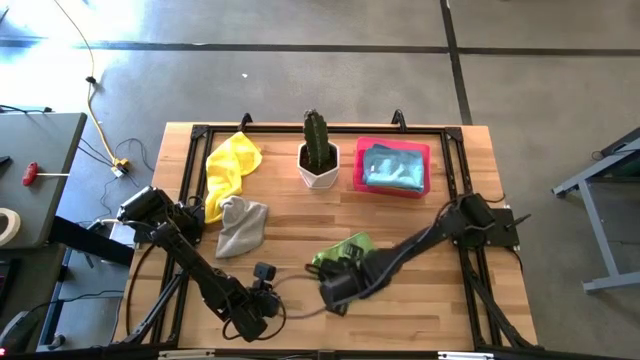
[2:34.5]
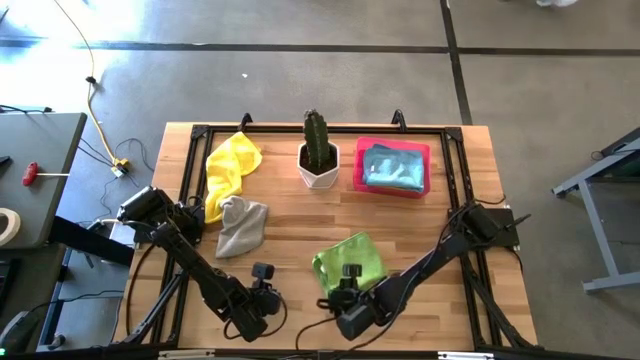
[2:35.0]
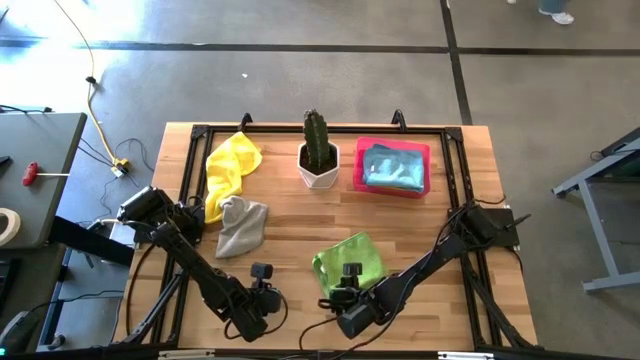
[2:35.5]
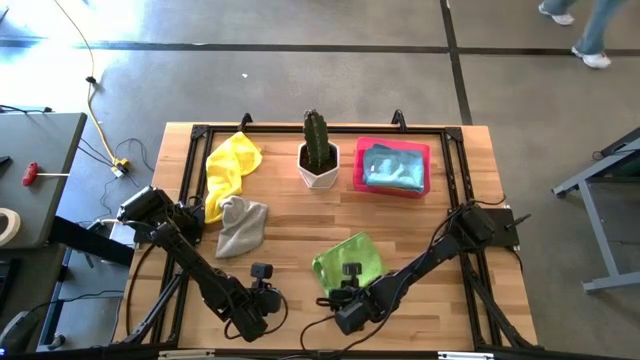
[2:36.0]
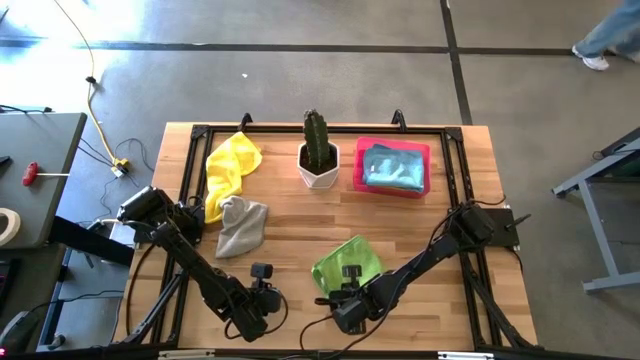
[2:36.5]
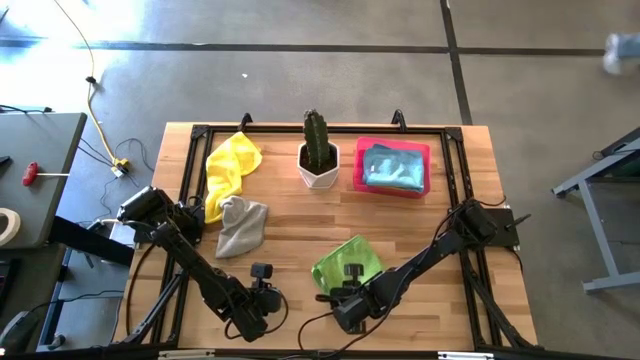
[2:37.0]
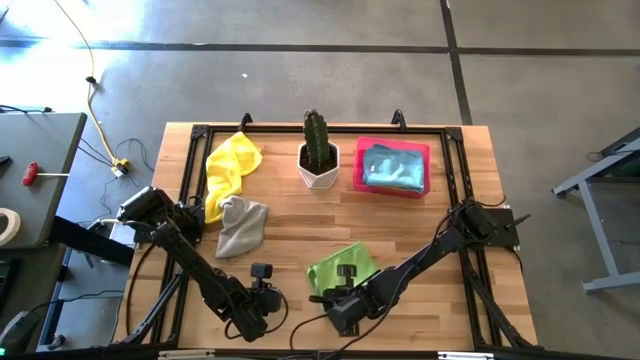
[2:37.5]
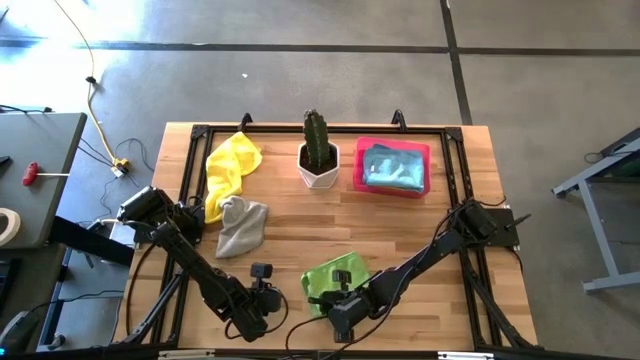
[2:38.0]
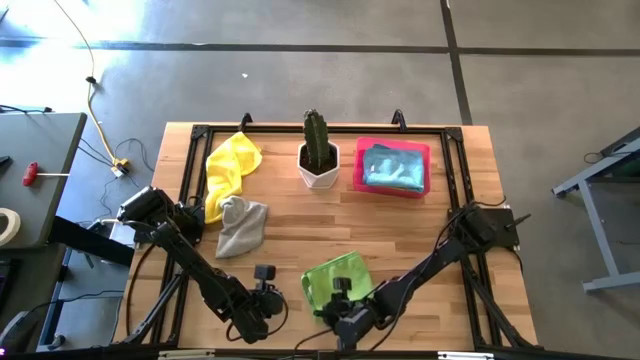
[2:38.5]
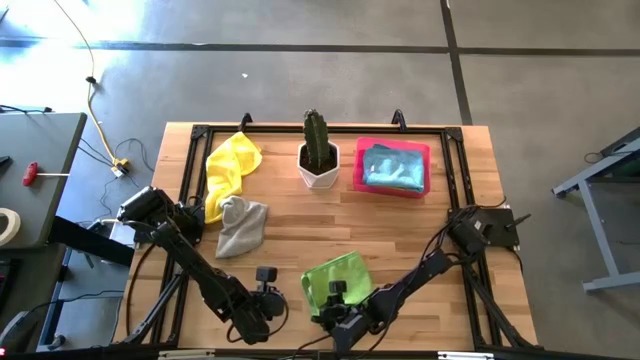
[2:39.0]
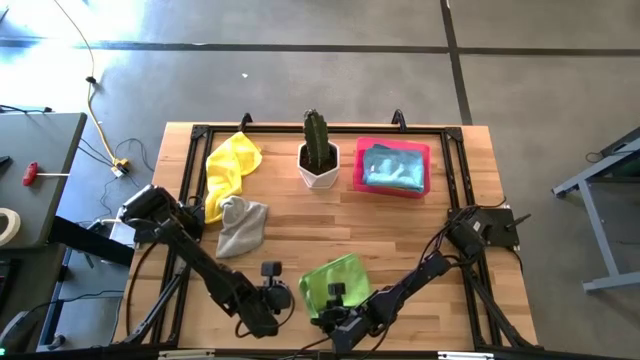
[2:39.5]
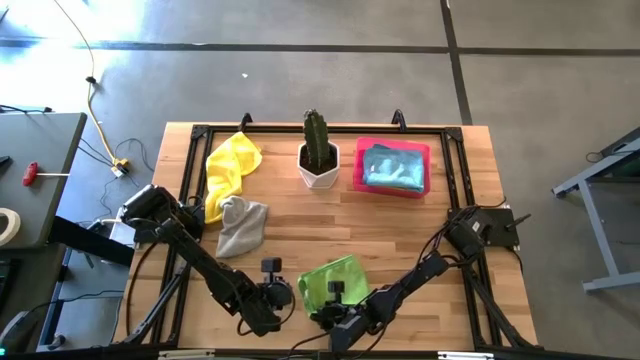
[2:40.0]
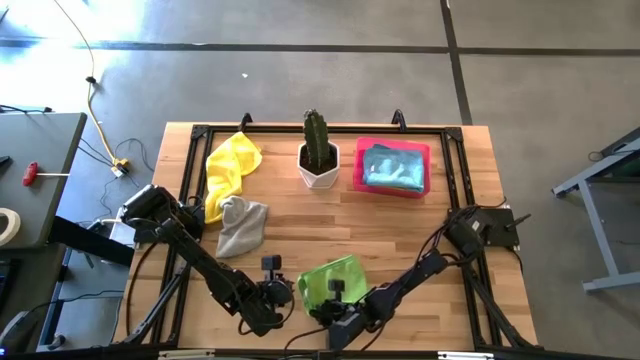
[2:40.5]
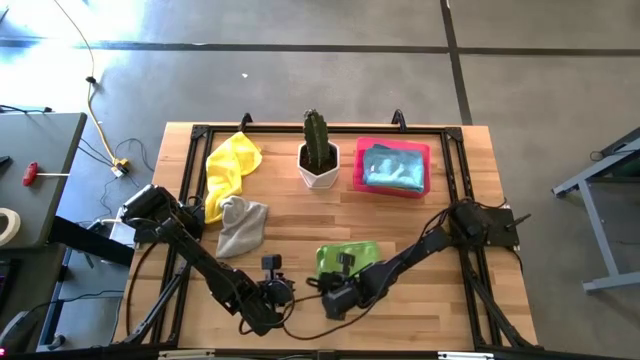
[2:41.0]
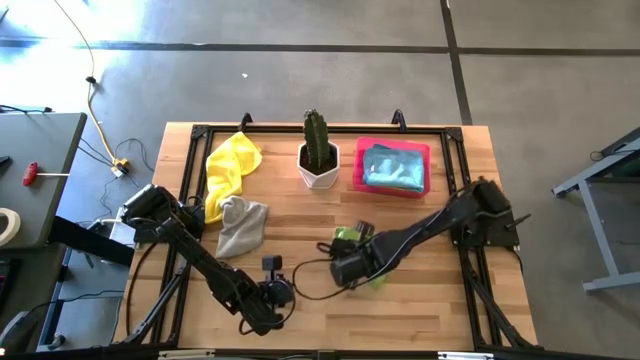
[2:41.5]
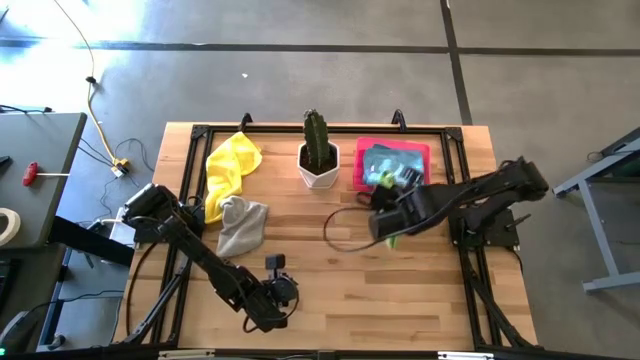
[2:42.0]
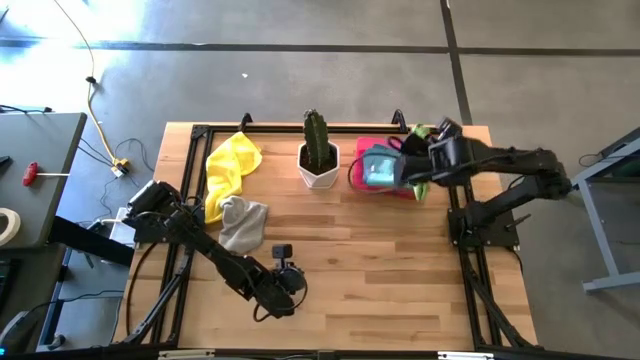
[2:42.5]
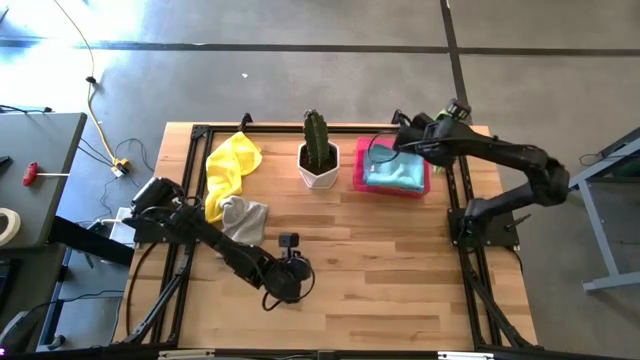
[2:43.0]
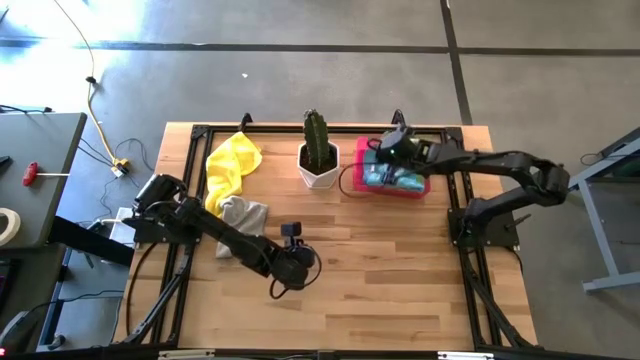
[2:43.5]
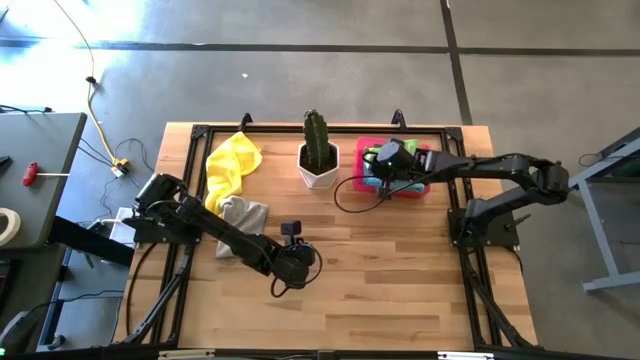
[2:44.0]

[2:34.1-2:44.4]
Task: Fold microfiber towels
Put the yellow green towel into the pink laundry bin

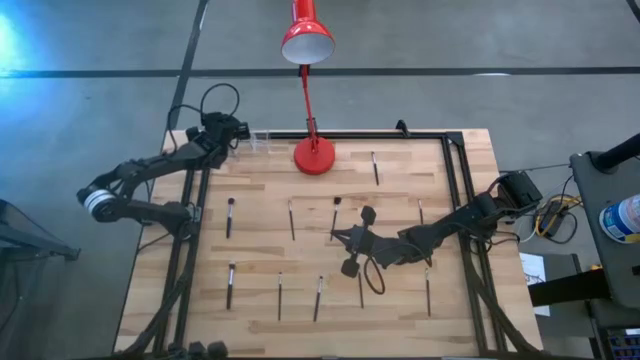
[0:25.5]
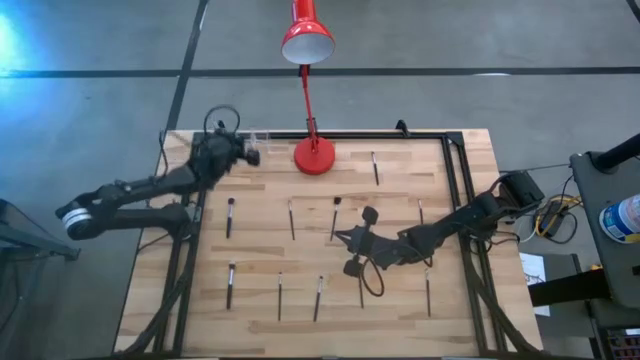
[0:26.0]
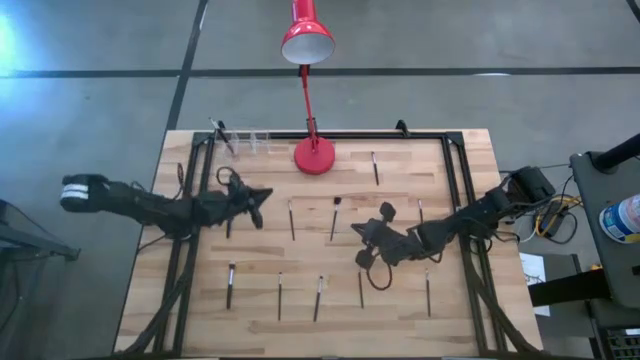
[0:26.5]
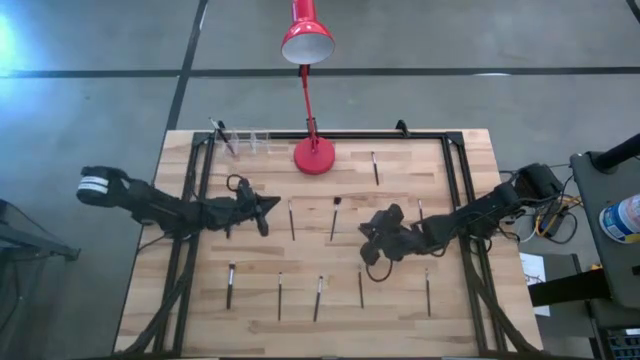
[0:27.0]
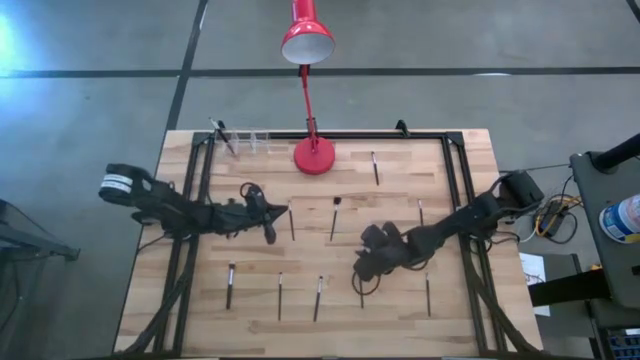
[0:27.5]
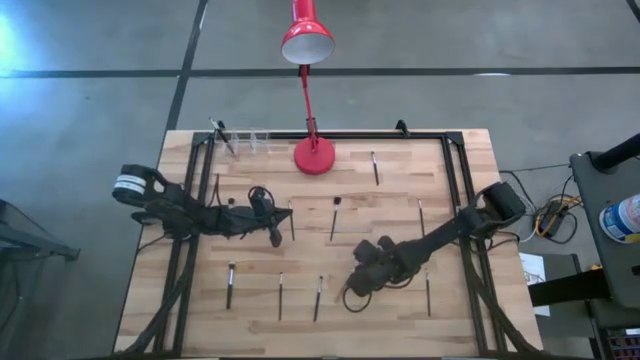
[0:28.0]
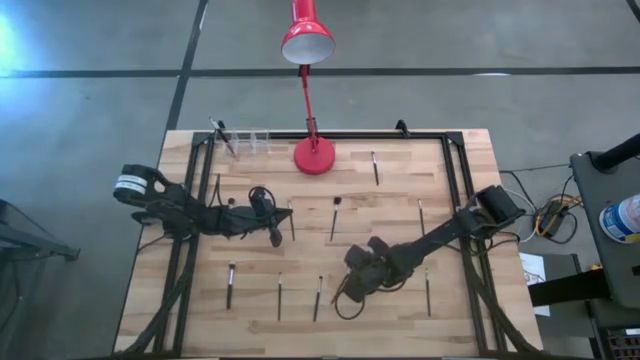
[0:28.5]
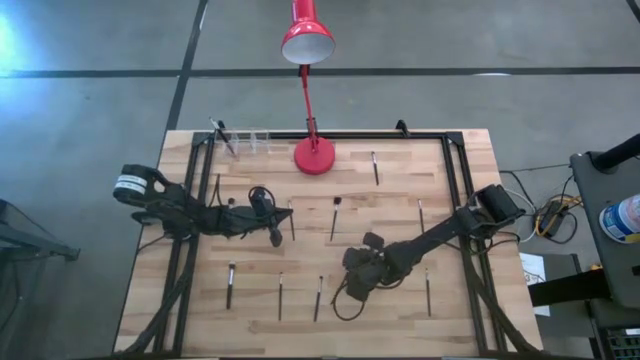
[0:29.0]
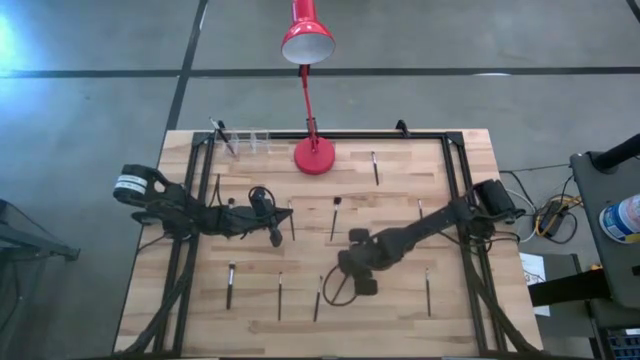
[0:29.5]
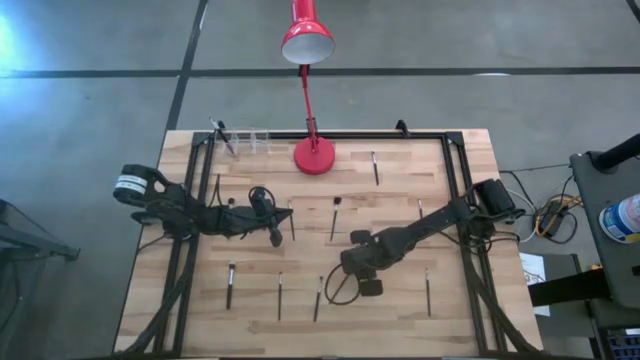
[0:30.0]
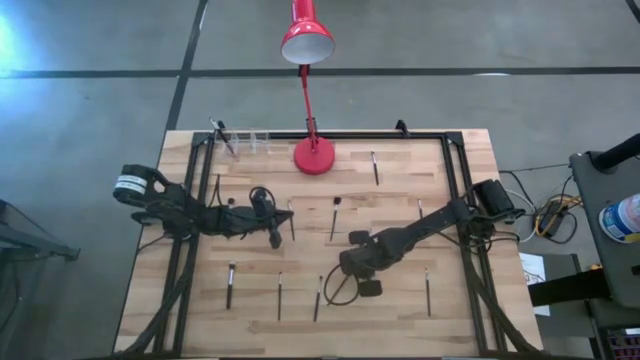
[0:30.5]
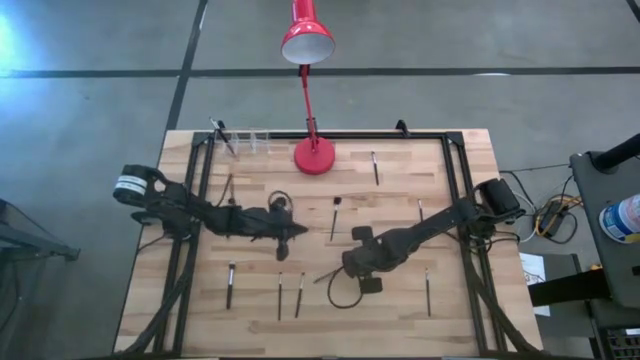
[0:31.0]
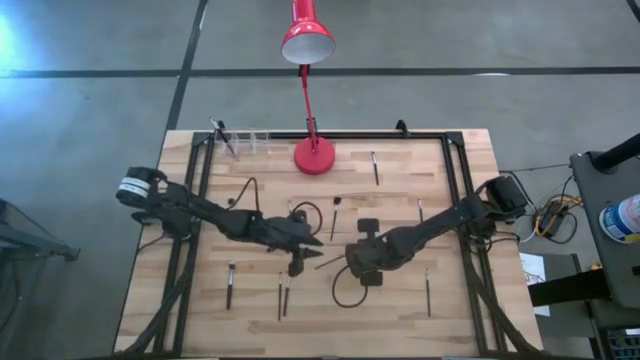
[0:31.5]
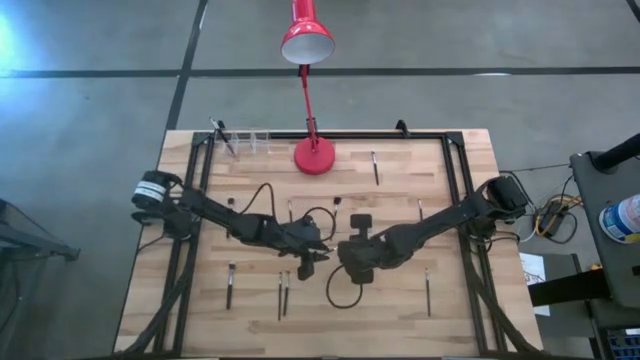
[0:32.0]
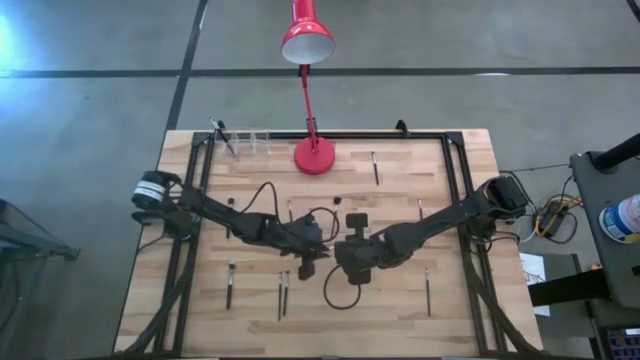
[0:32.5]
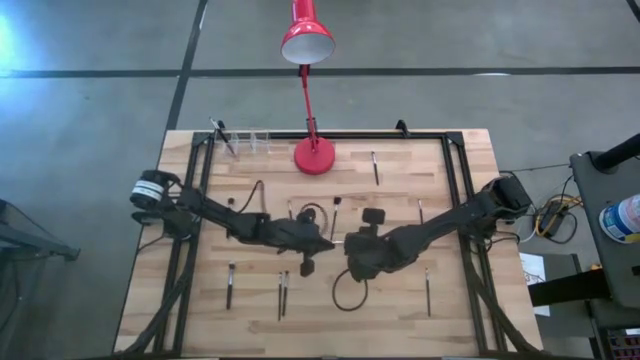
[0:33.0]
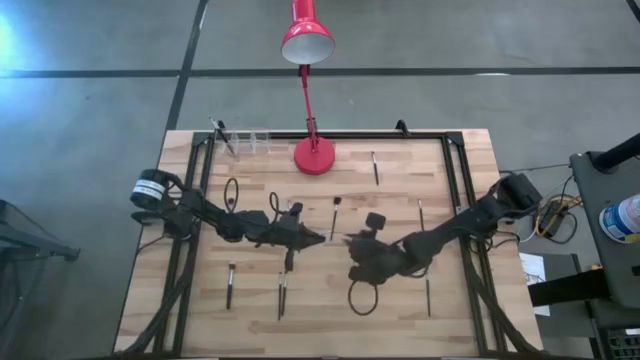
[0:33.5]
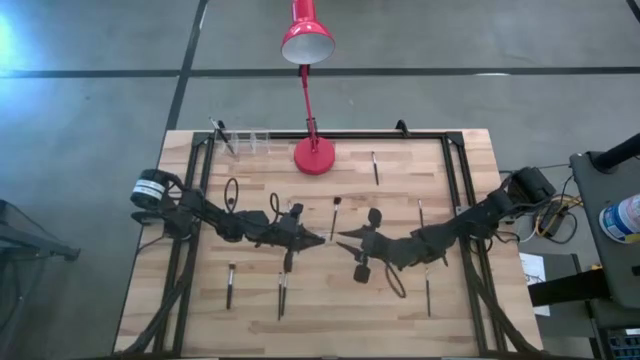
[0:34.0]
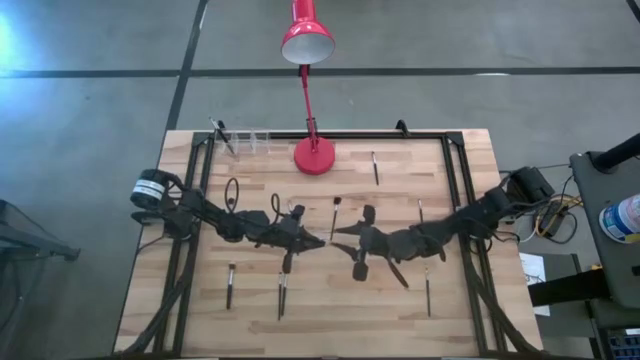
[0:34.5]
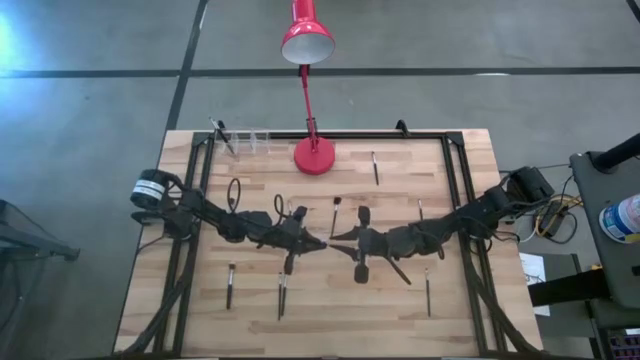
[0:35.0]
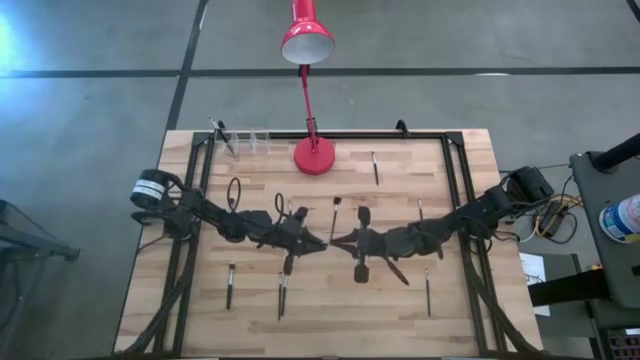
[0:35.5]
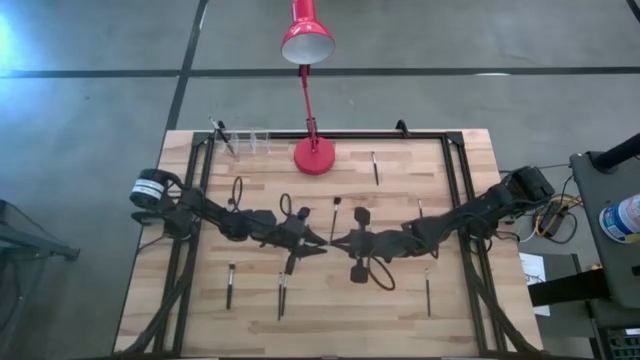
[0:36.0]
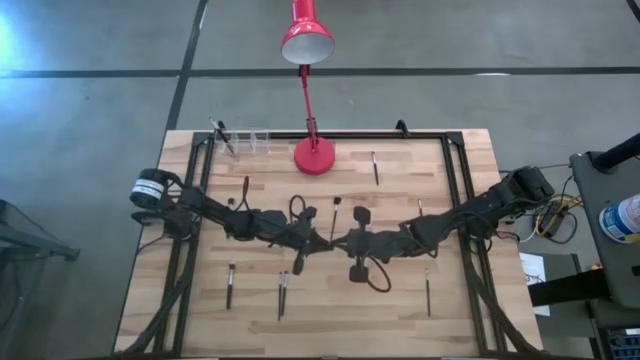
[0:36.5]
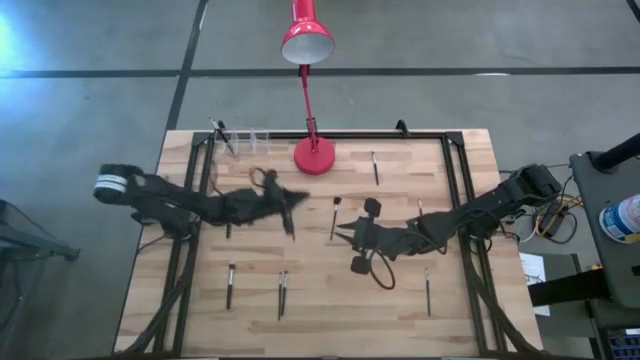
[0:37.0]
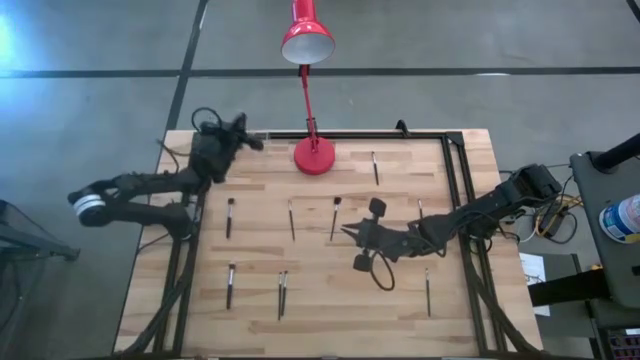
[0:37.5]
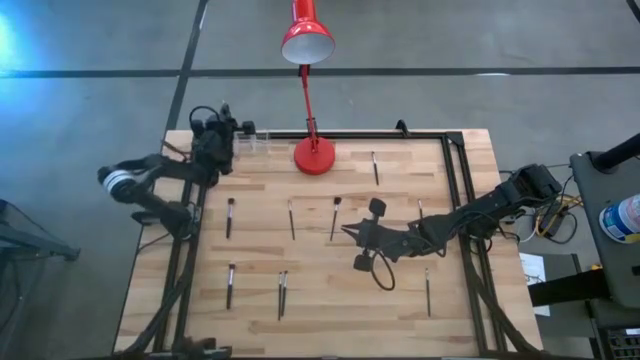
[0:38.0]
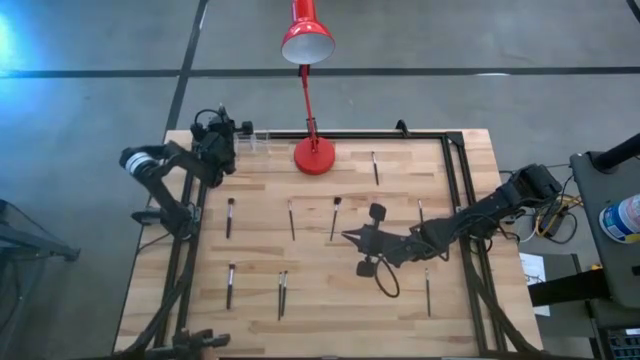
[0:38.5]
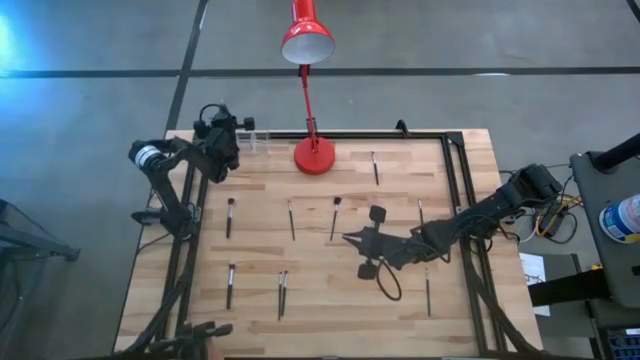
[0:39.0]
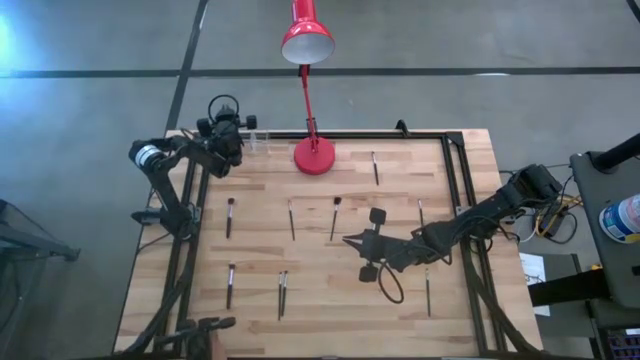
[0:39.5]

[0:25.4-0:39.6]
Task: Pick & Place Makeup Supplies
Put the makeup brush into the transparent organizer
